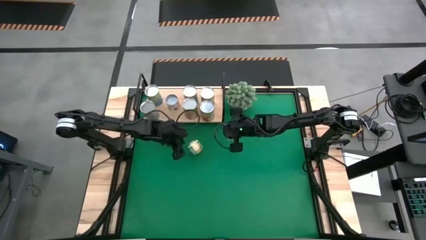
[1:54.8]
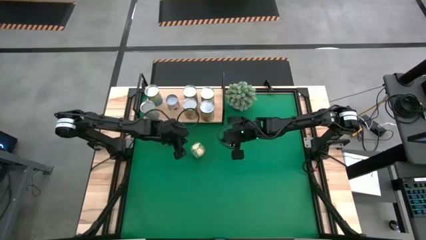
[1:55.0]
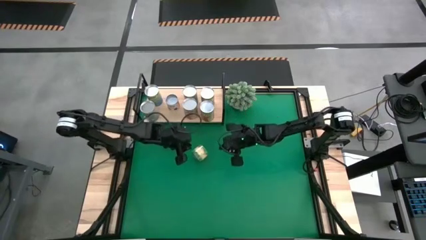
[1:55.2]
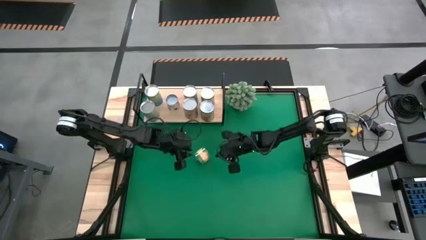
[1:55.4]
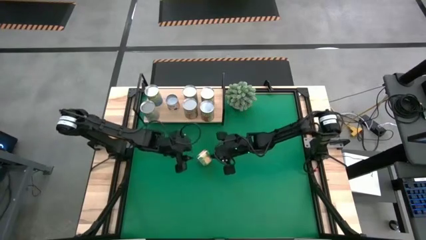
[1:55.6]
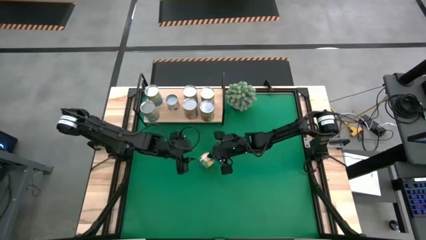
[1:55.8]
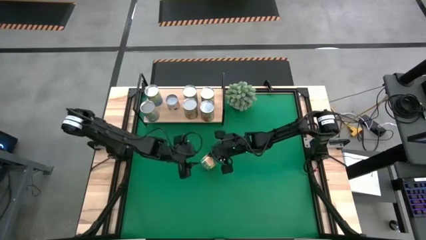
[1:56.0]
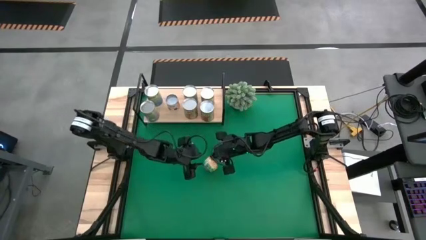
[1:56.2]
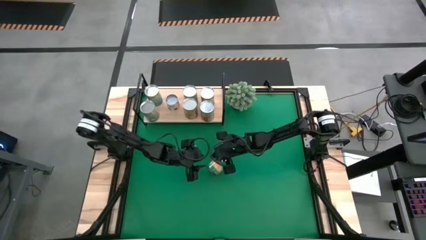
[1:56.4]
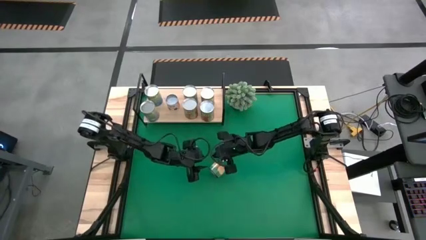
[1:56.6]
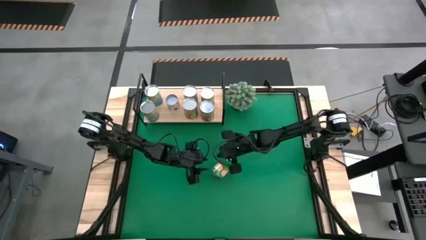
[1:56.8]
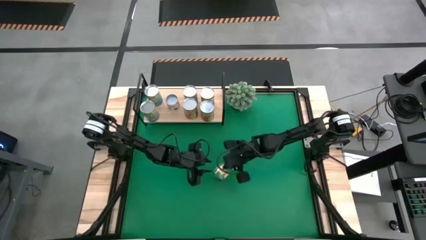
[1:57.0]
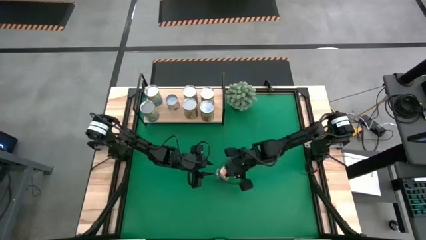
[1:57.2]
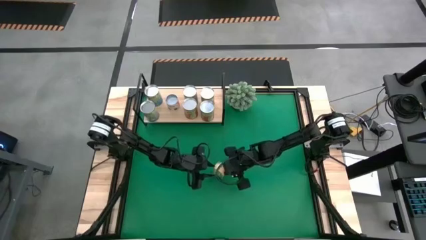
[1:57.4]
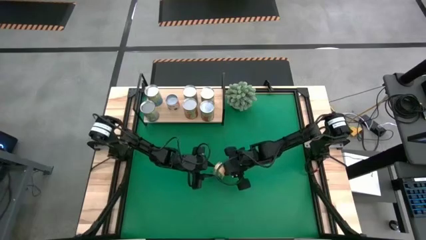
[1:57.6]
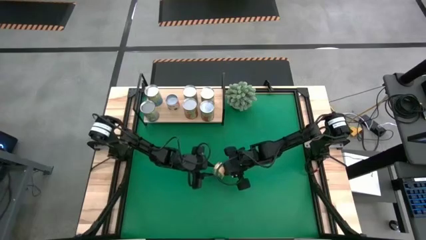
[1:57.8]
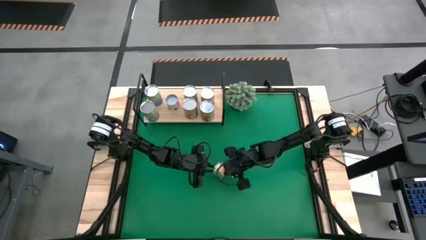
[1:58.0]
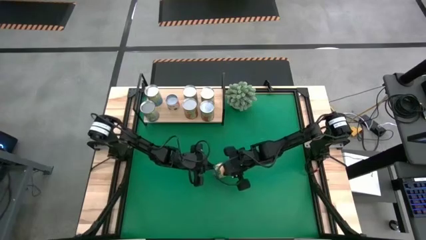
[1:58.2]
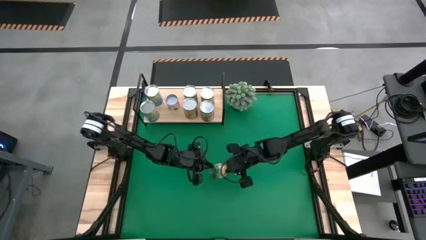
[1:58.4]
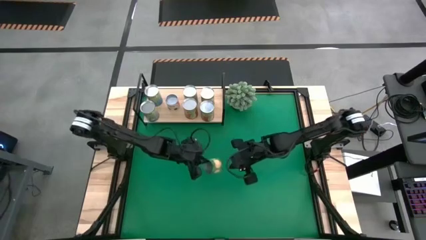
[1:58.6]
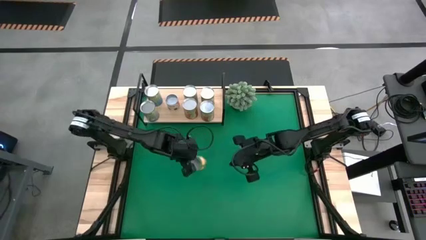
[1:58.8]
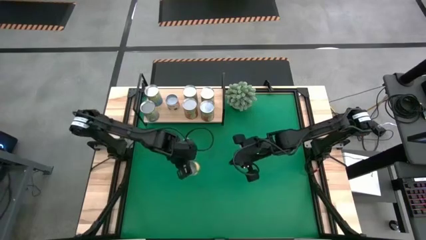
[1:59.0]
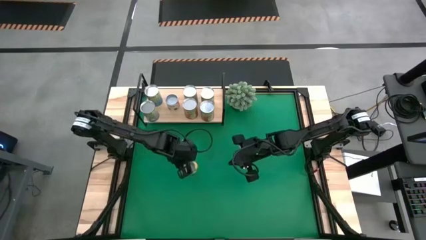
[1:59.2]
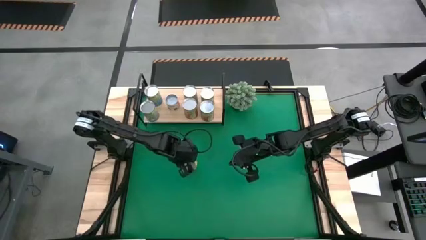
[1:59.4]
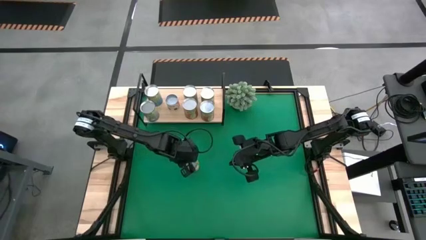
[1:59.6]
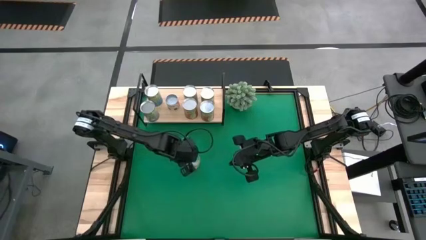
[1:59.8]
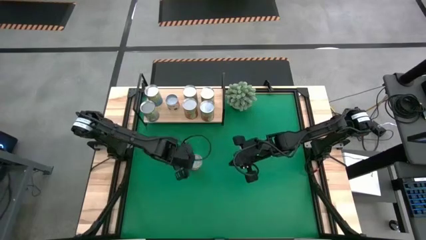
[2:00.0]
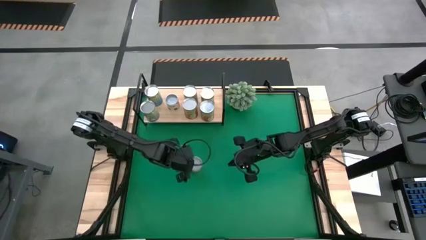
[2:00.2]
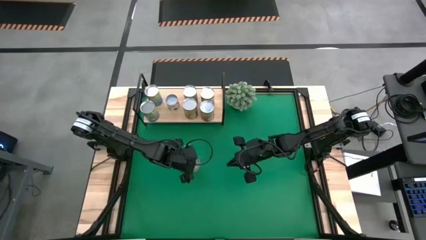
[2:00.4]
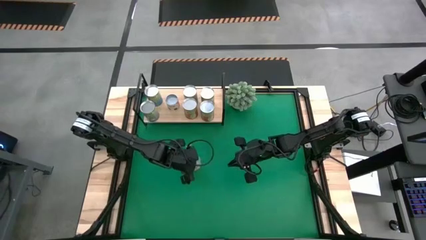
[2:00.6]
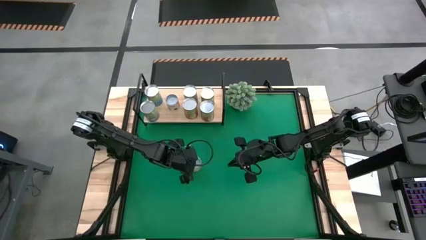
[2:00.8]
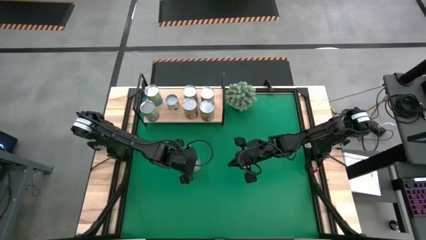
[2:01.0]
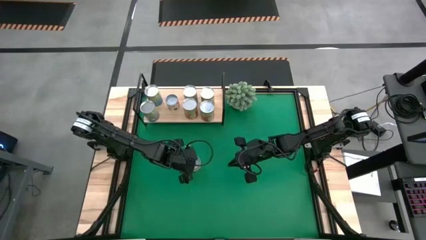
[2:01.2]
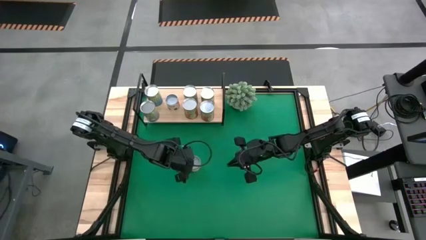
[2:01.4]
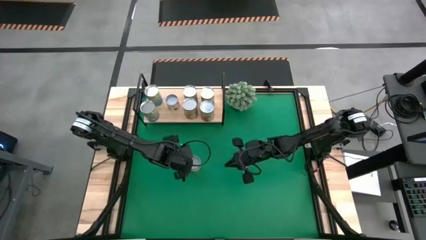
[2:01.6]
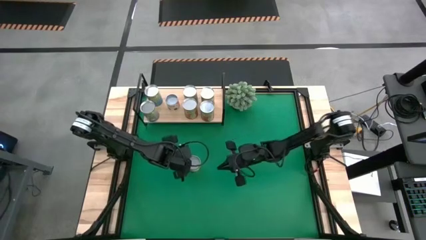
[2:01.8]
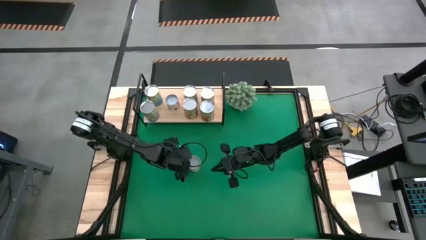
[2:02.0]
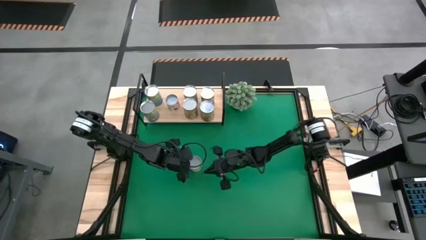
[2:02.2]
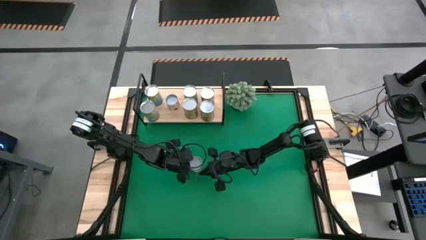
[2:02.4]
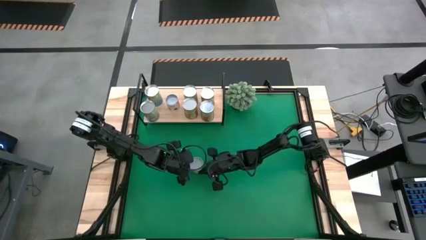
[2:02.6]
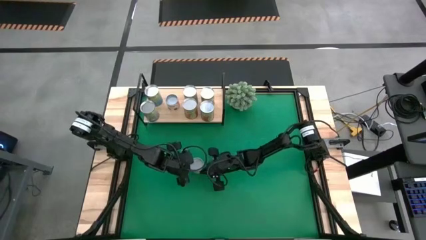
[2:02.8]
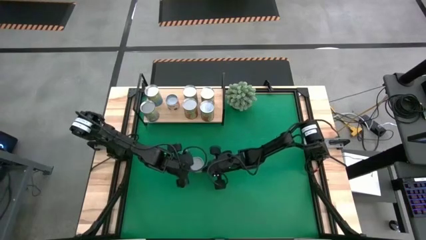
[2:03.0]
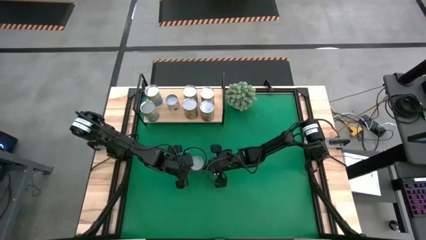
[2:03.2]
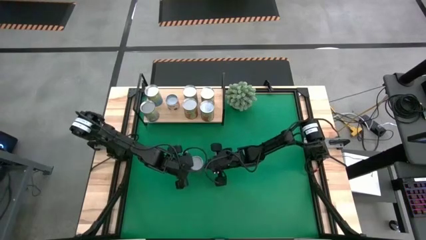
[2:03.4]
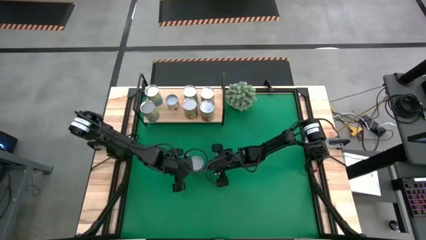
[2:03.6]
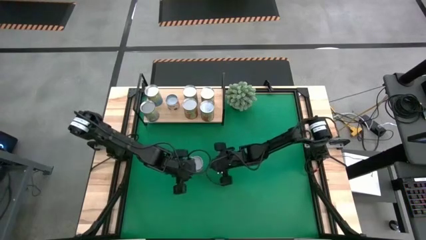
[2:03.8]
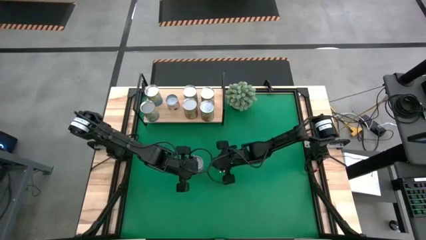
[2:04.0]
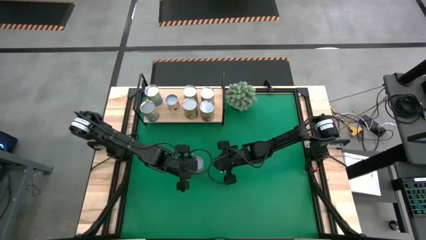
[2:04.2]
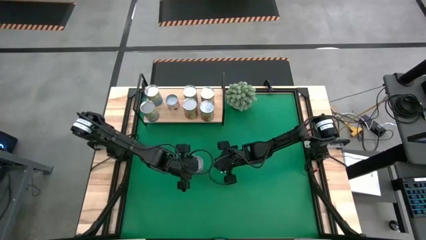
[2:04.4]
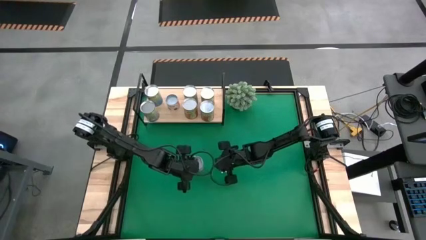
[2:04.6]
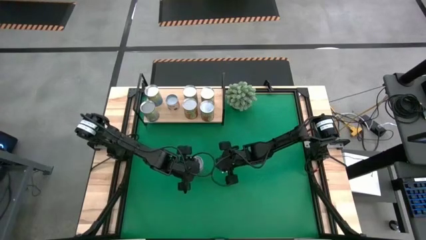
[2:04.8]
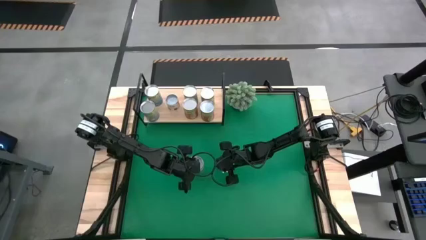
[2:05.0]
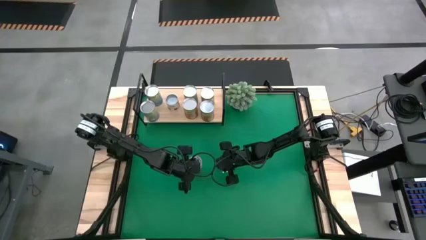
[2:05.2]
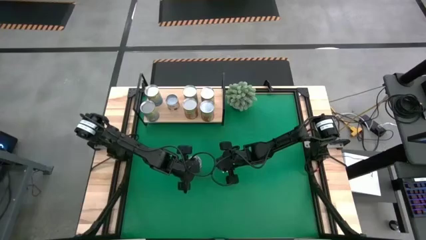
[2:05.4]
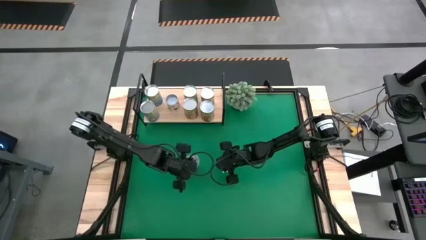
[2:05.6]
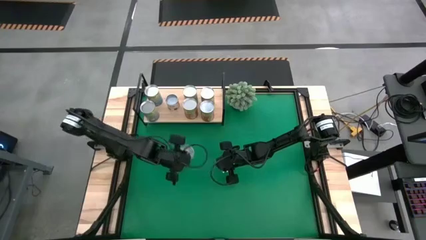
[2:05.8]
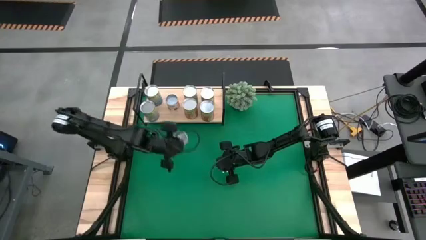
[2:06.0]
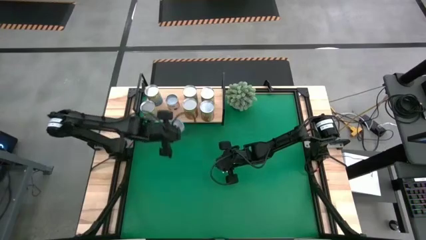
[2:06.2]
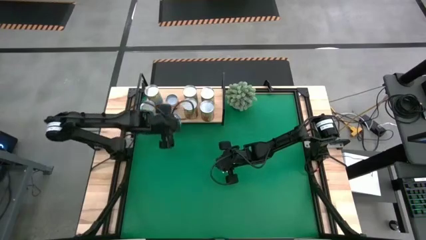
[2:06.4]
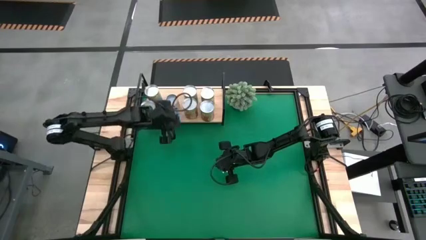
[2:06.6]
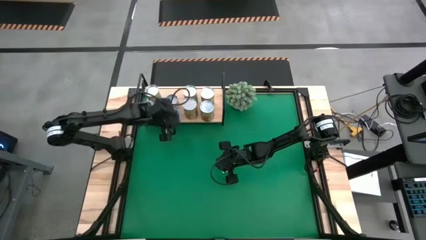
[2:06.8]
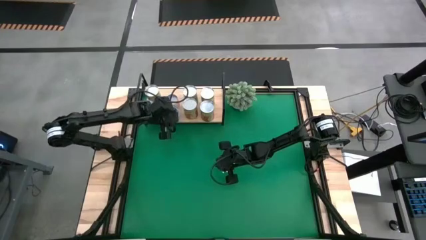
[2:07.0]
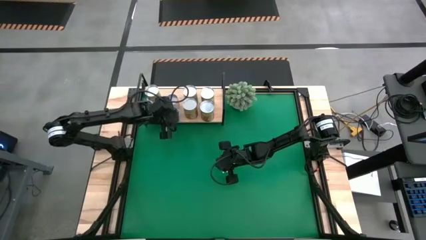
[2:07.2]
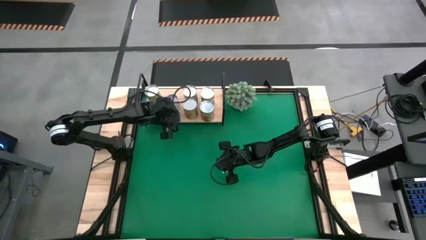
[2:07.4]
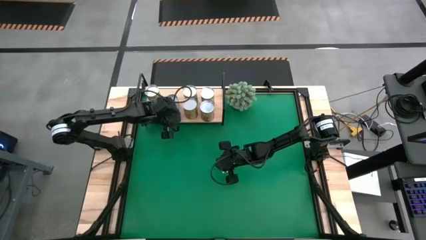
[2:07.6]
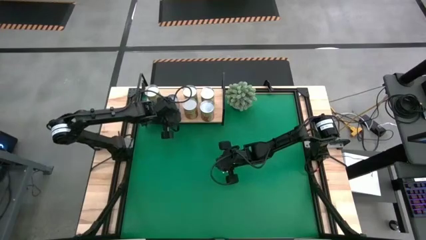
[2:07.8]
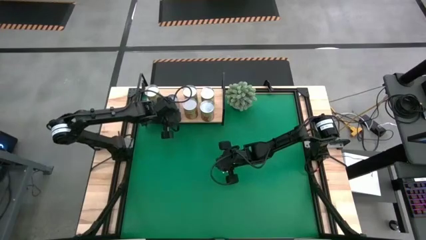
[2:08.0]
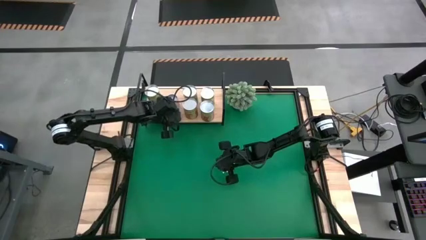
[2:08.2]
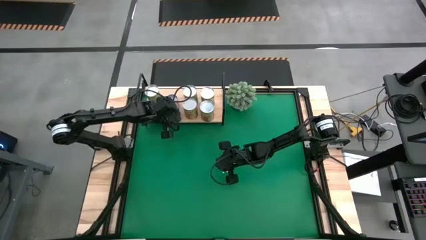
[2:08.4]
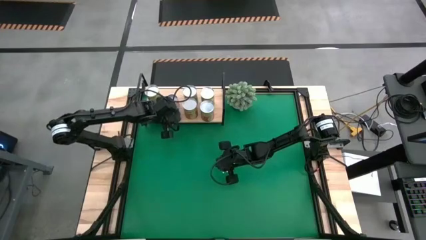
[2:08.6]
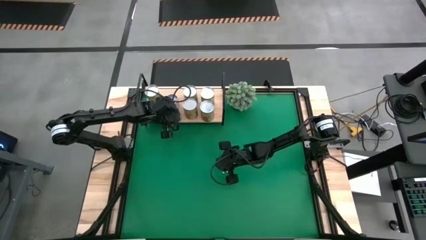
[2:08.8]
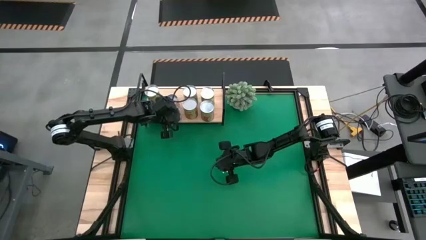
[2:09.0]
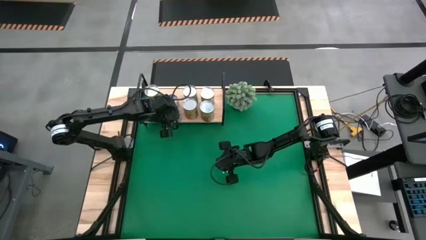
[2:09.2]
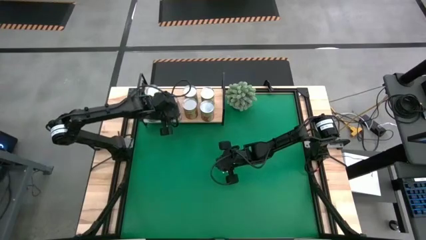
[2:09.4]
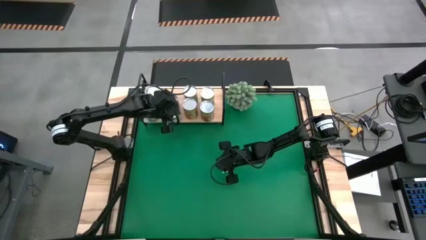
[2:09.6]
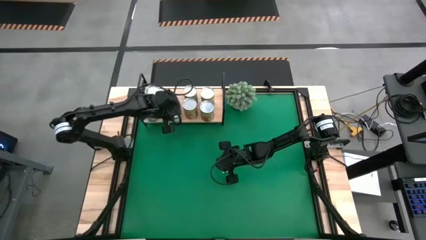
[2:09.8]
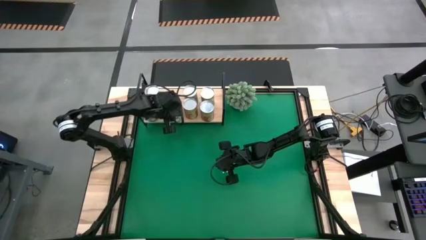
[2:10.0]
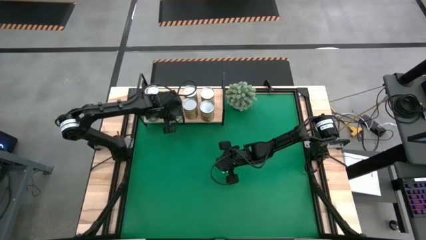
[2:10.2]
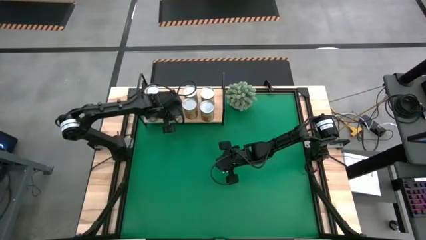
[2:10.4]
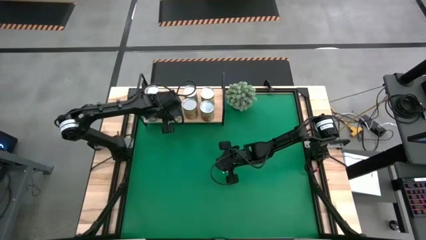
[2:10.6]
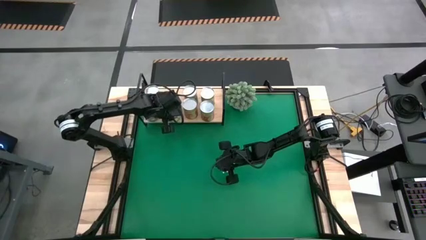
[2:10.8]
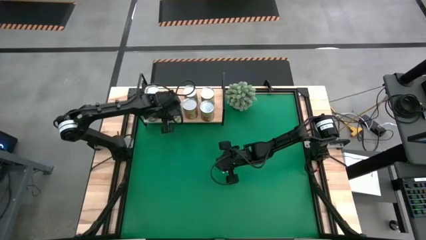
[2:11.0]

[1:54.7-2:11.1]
Task: Pick and place cans onto a shelf
Put the canned sliced peaches on the shelf

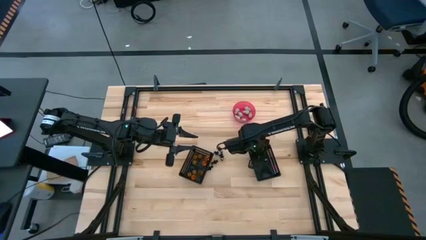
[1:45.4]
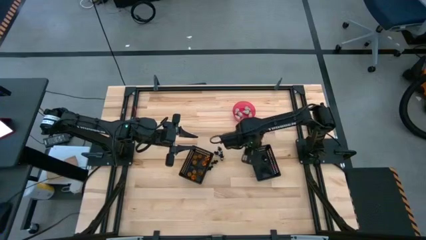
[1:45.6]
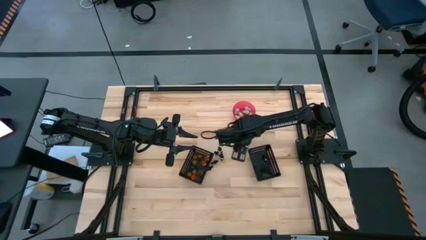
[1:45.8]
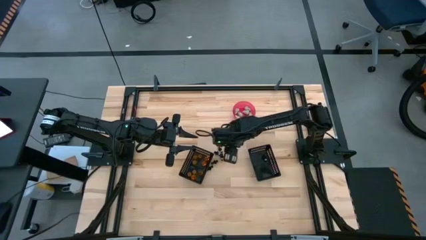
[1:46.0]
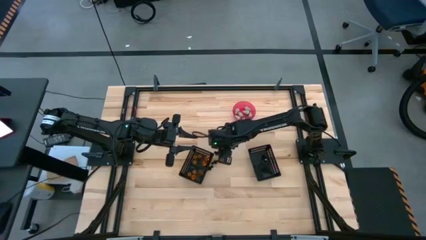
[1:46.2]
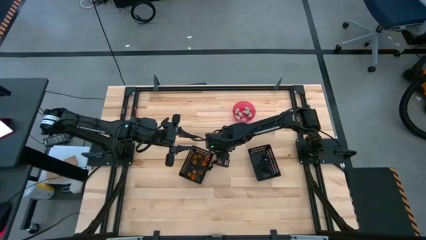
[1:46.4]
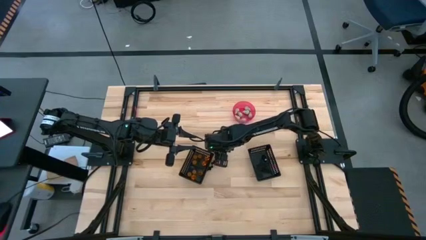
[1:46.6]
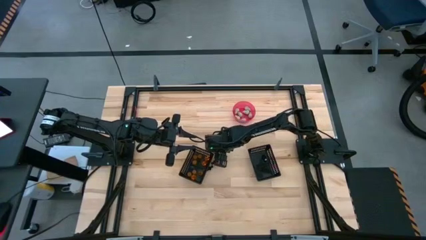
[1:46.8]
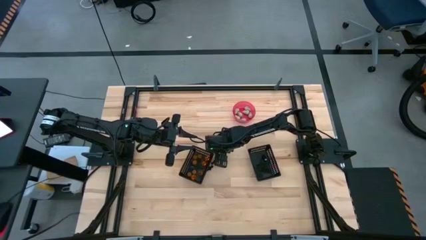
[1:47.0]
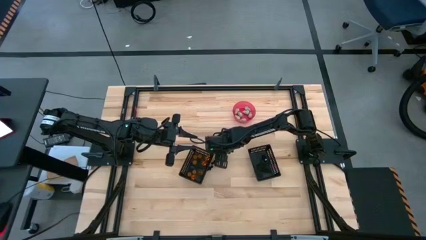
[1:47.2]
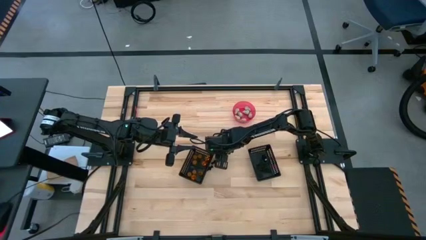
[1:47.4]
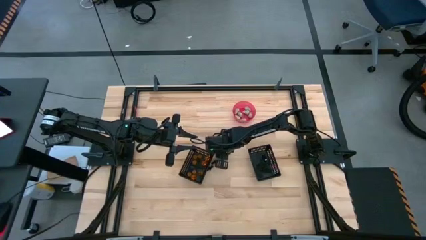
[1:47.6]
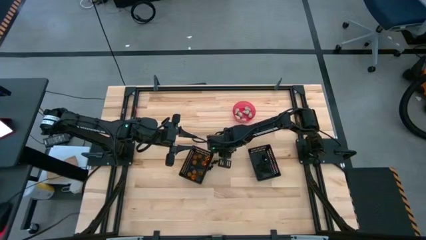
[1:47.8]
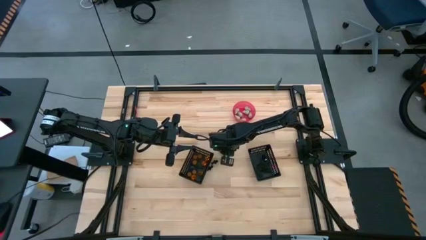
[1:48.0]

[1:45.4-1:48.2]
Task: Sort Halloween decoration
Put the black skeleton toy into the right black bin
